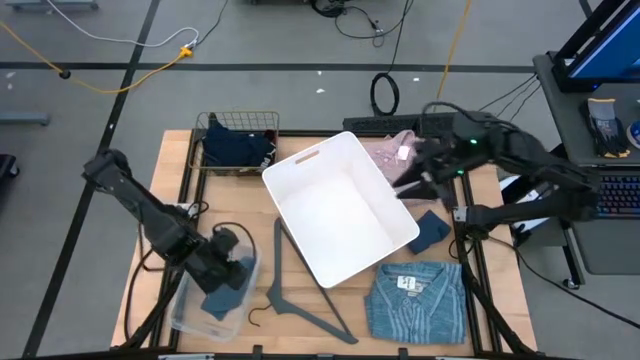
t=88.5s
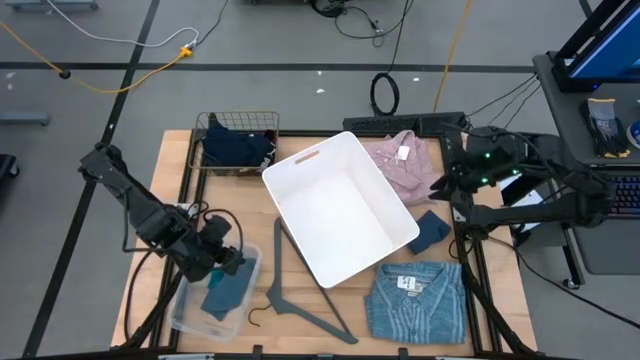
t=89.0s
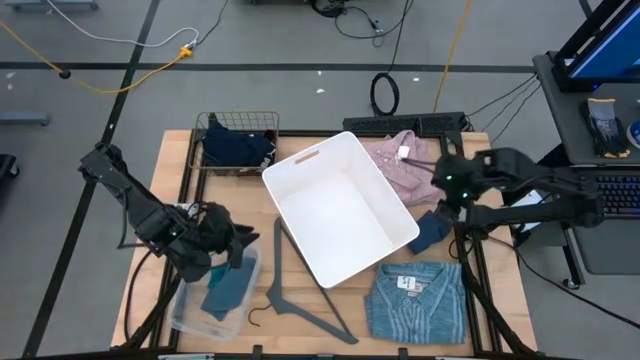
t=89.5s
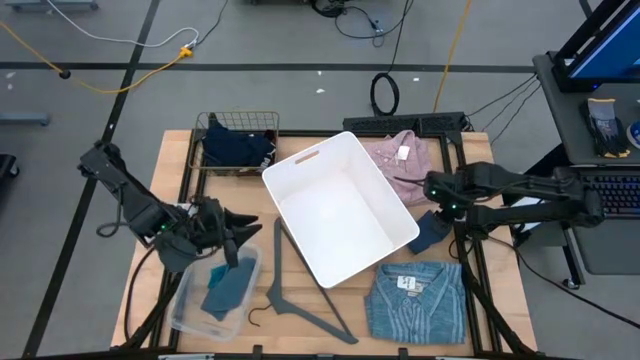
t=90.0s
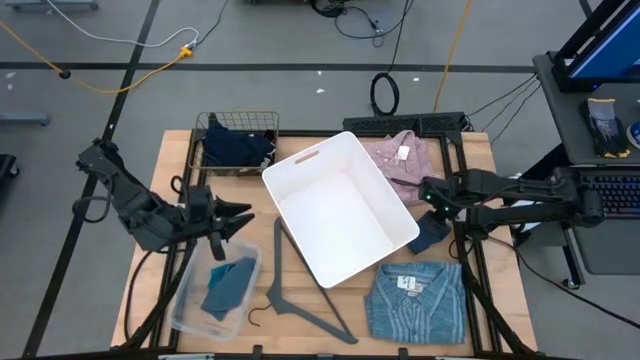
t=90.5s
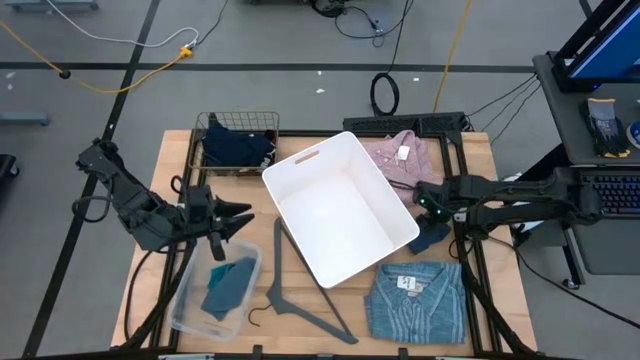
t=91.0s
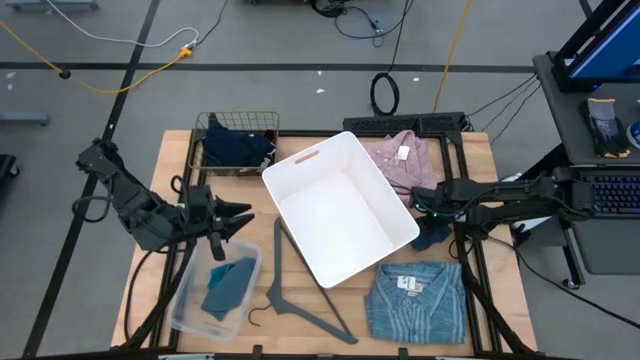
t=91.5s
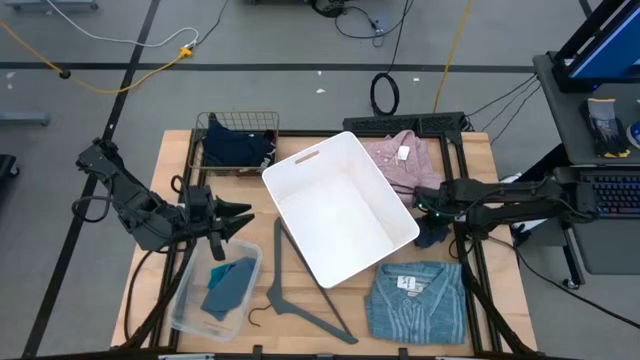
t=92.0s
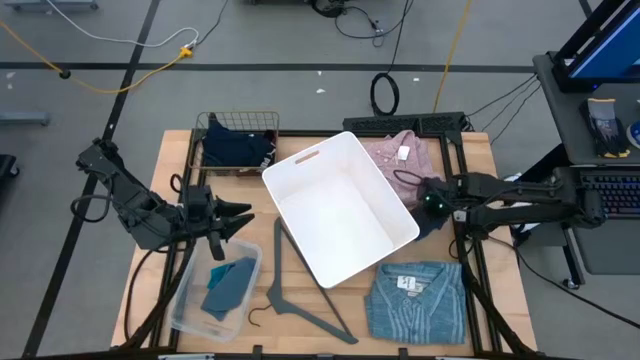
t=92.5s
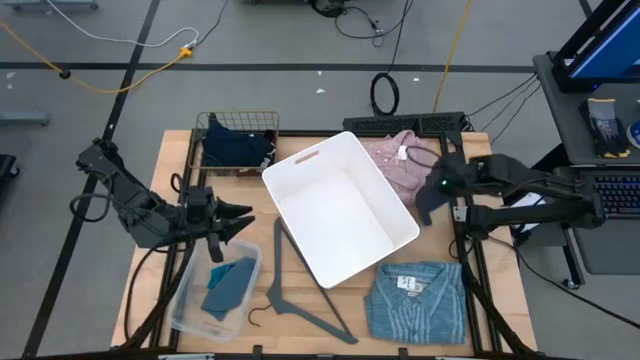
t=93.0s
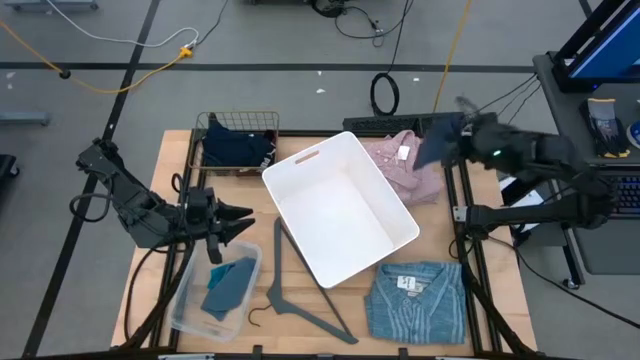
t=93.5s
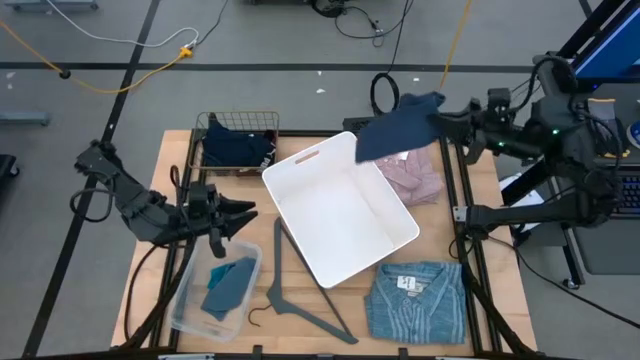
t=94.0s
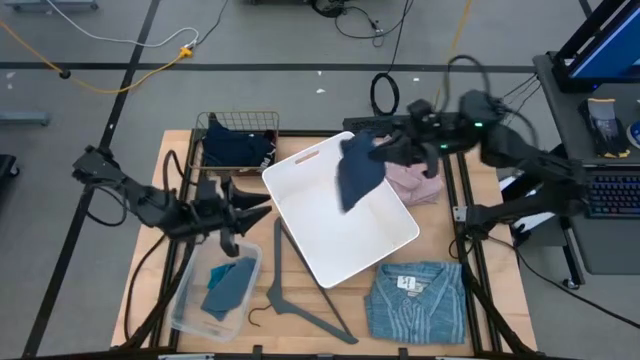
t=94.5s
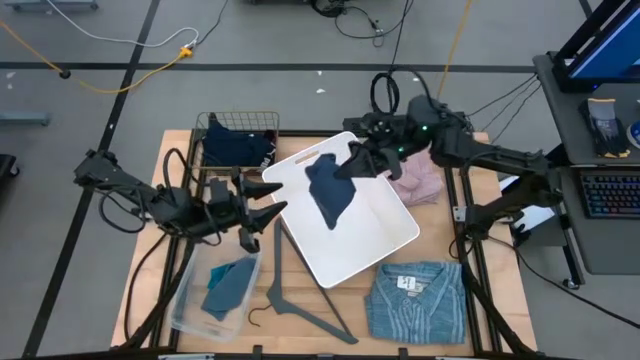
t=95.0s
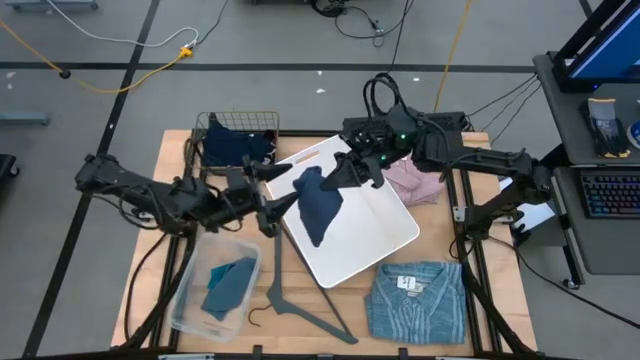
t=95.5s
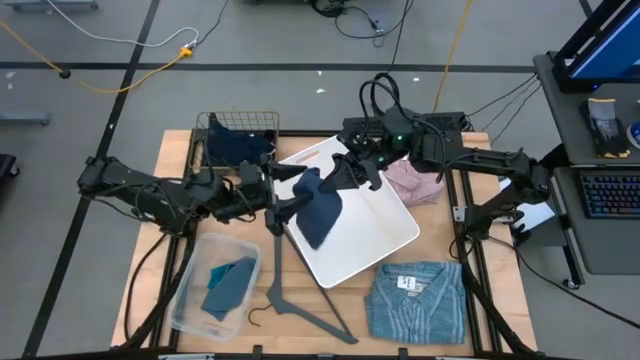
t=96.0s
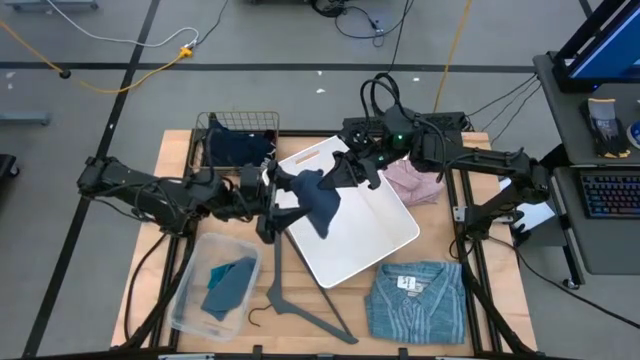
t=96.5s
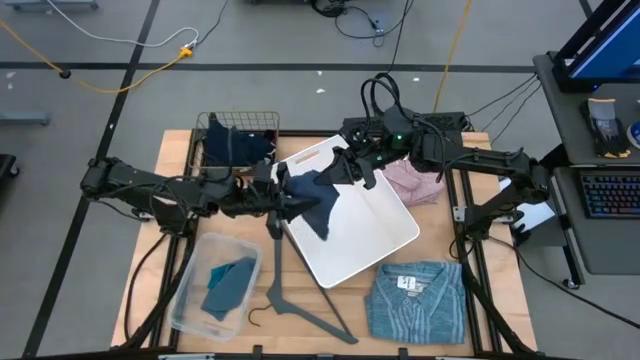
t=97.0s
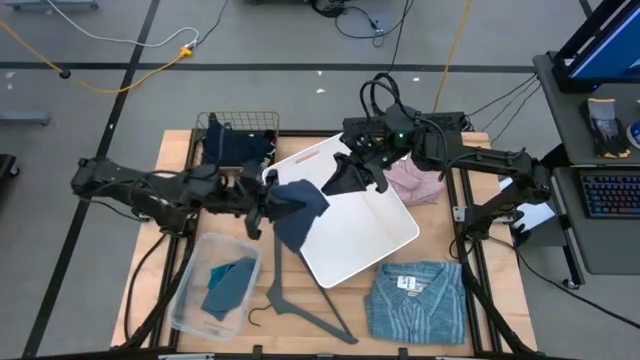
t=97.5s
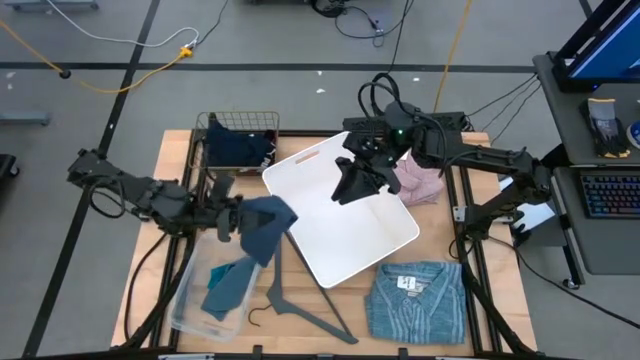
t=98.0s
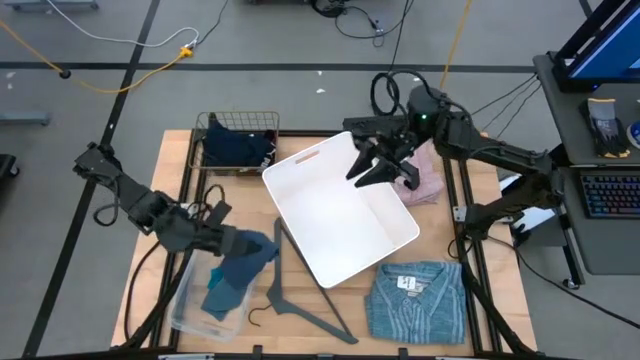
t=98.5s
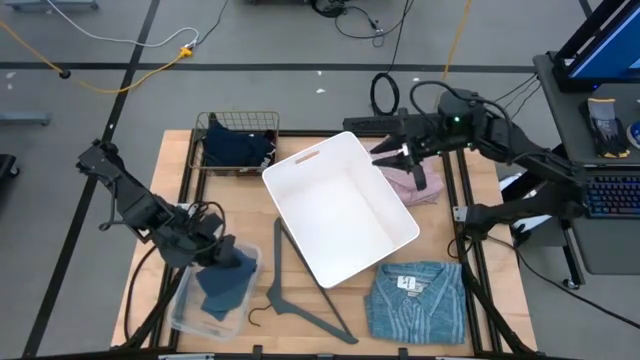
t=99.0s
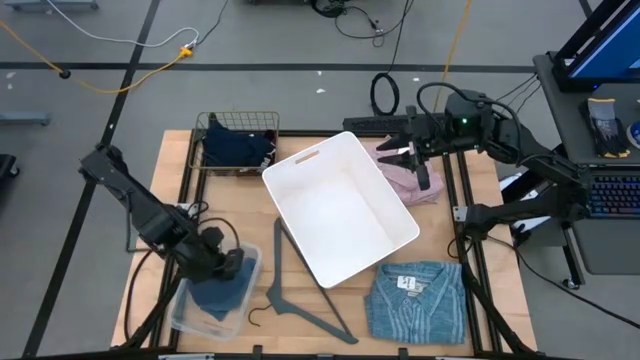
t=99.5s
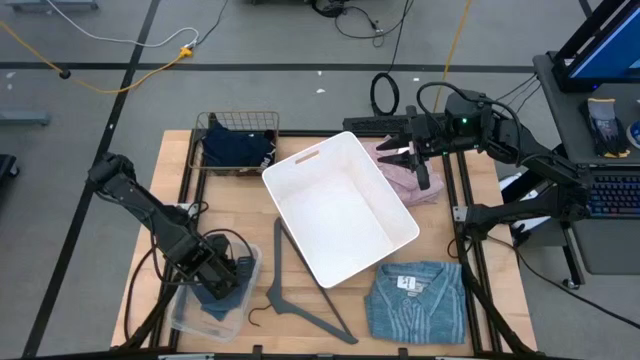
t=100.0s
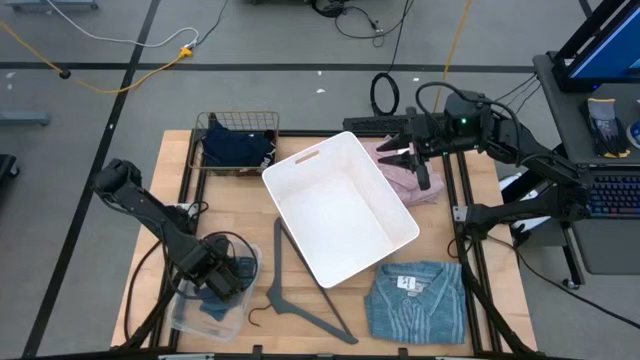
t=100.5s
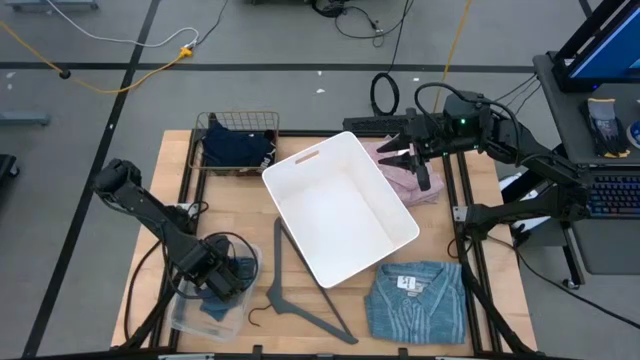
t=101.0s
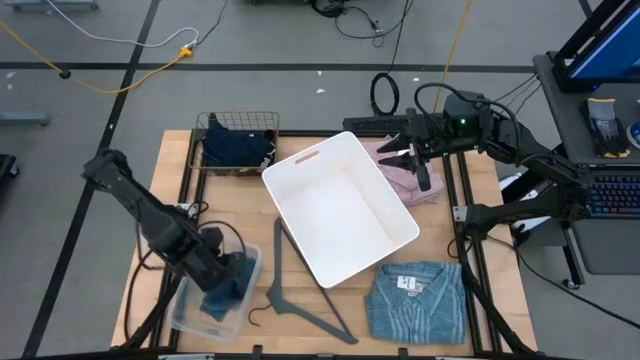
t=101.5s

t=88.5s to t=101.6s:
Task: Pick & Place Cloths
Put the blue sock into the transparent bin

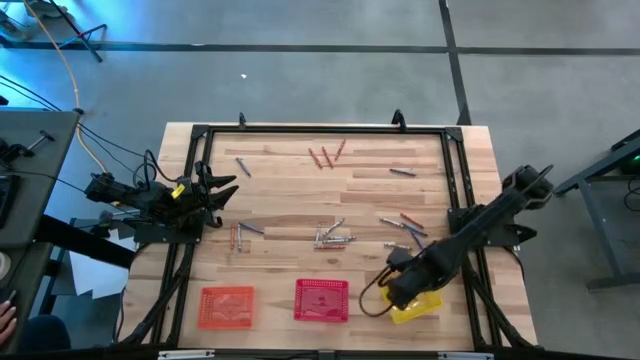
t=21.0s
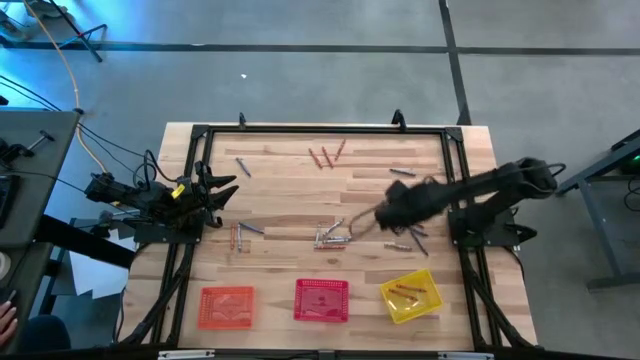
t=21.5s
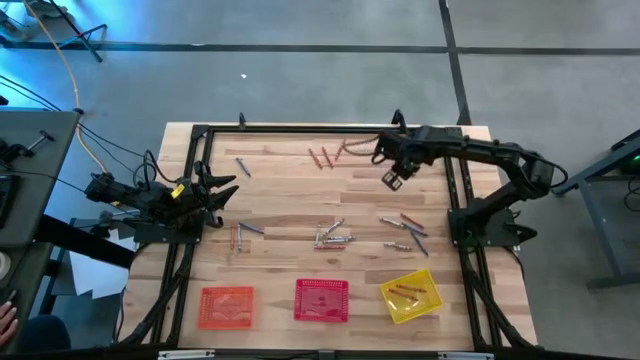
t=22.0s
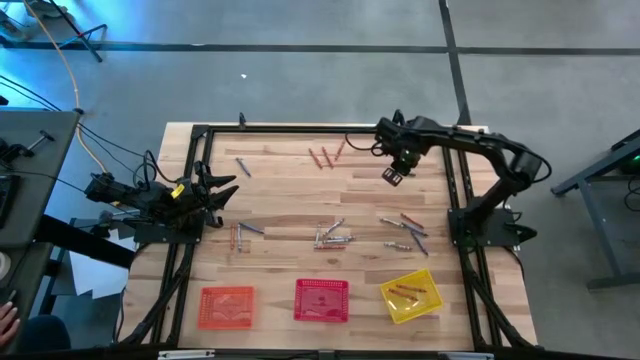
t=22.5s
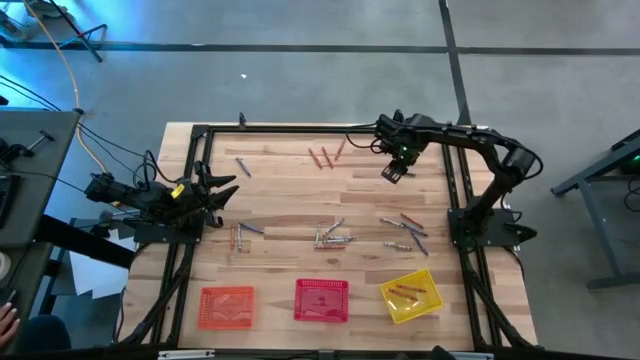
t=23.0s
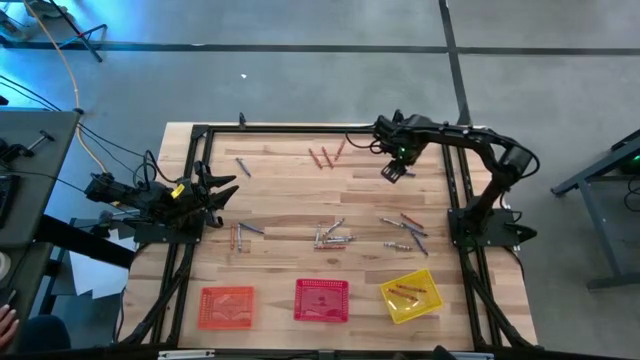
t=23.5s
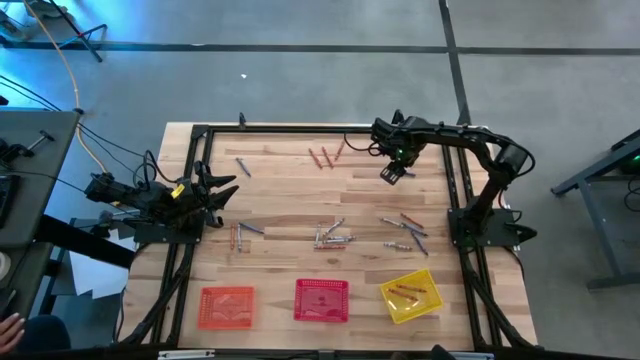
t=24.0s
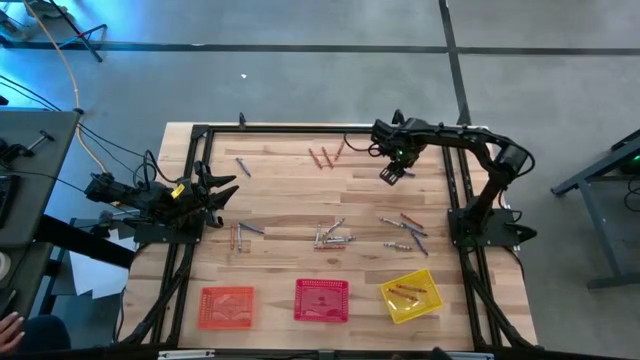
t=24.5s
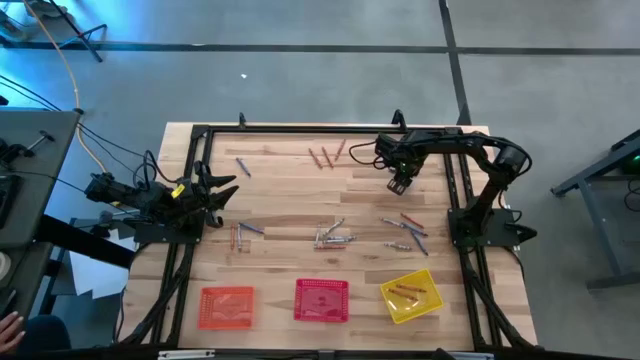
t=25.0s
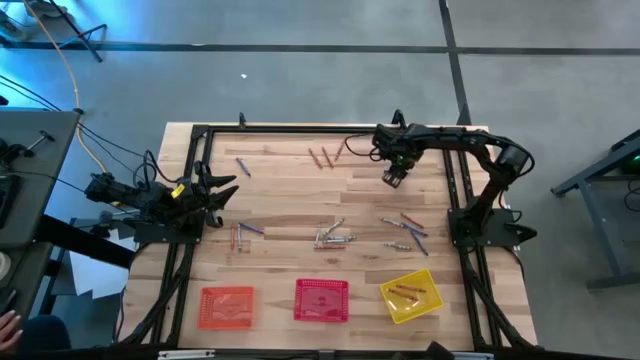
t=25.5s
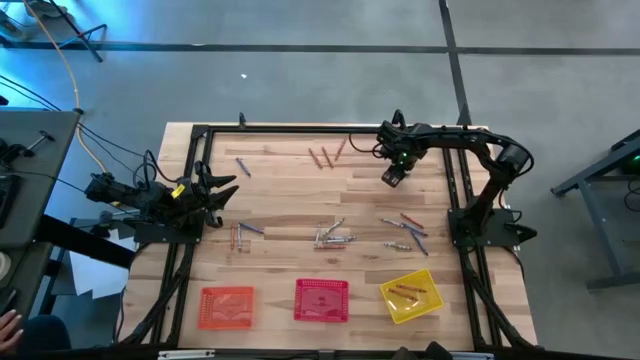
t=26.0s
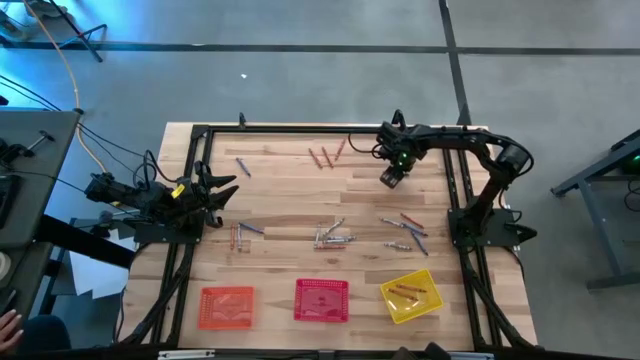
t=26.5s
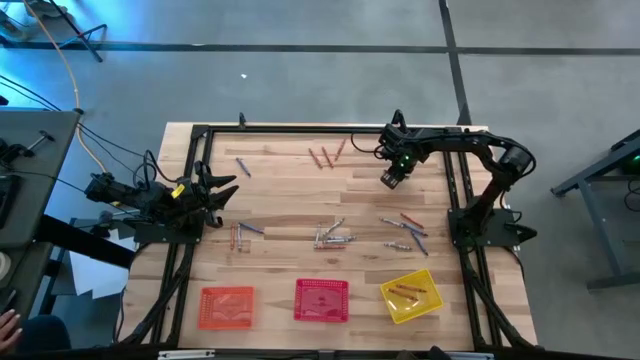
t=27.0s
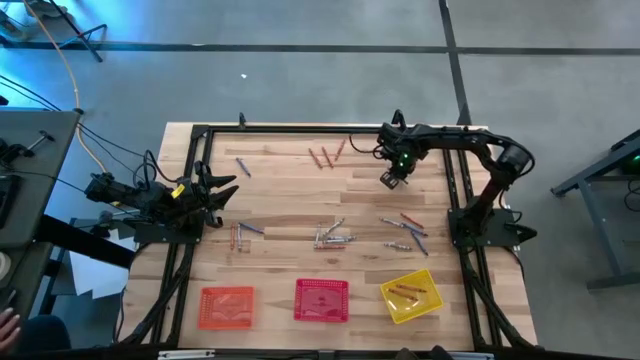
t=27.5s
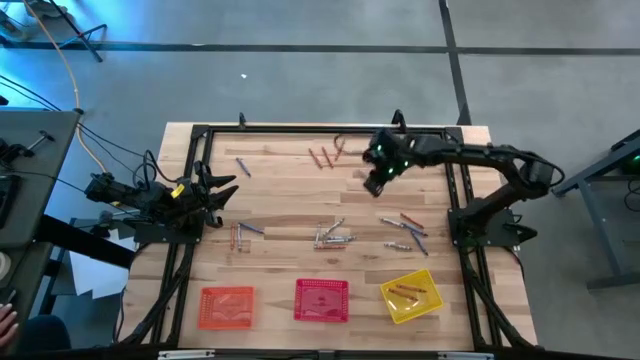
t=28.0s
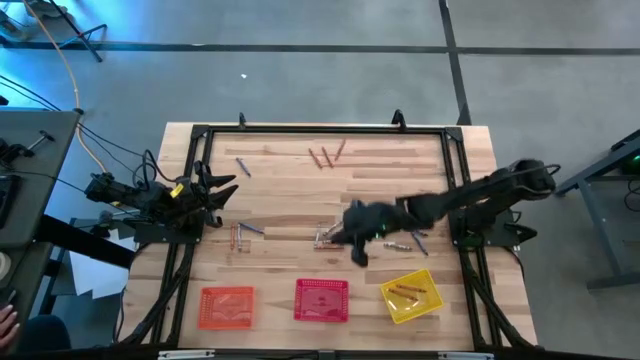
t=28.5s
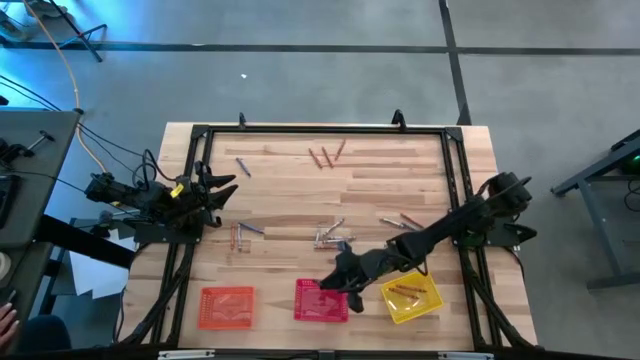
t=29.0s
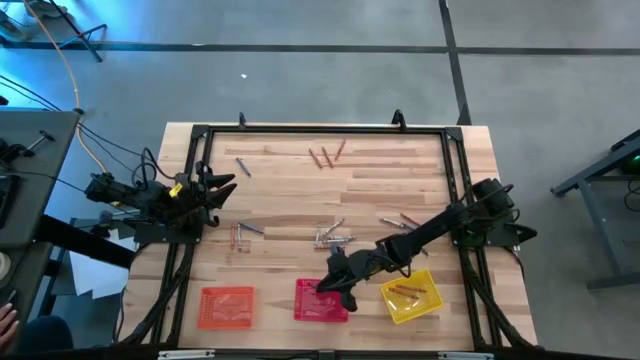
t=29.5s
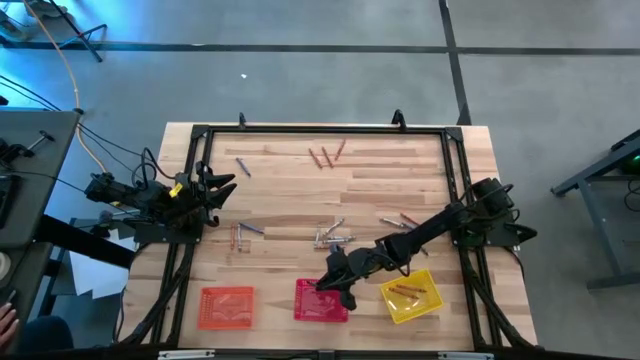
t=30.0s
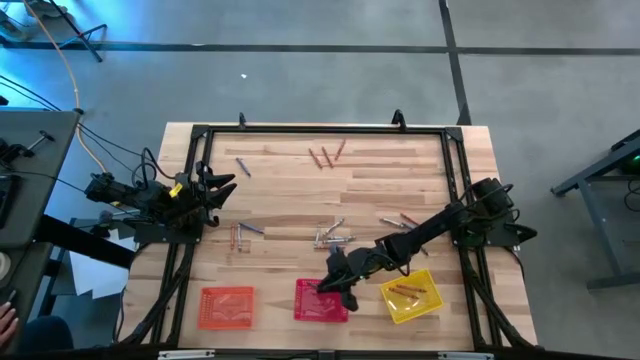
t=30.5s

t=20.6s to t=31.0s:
Task: Sort crayons
Put the blue crayon into the red bin
